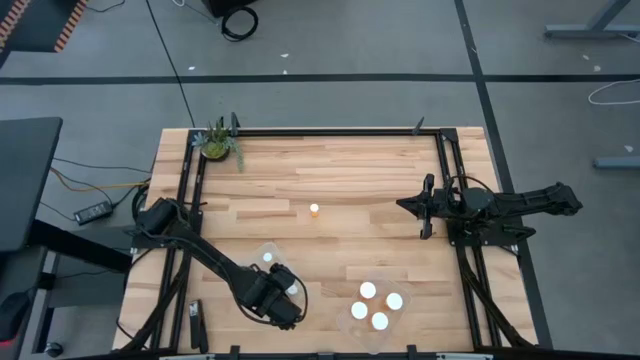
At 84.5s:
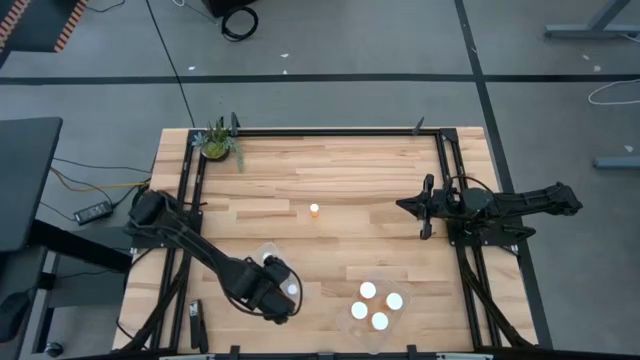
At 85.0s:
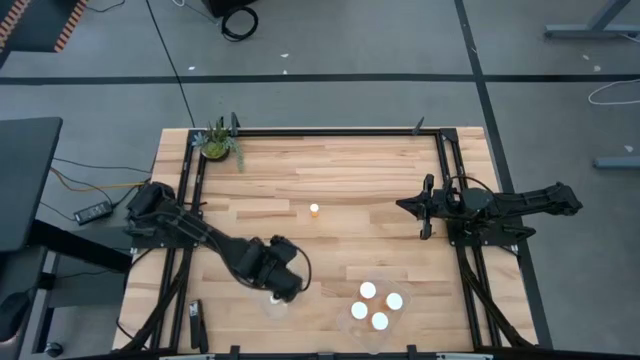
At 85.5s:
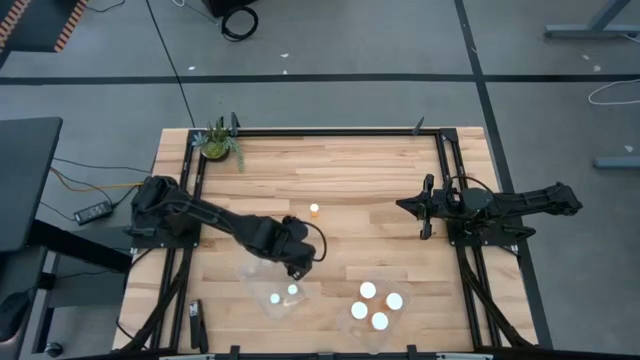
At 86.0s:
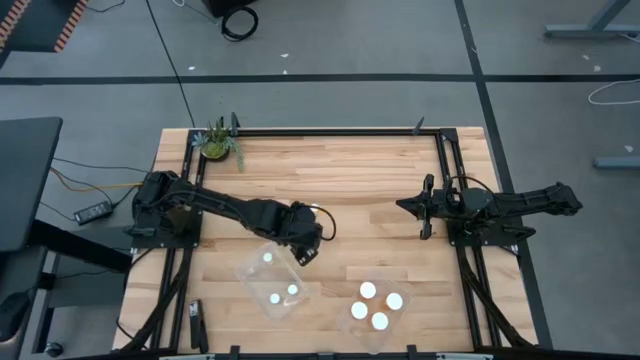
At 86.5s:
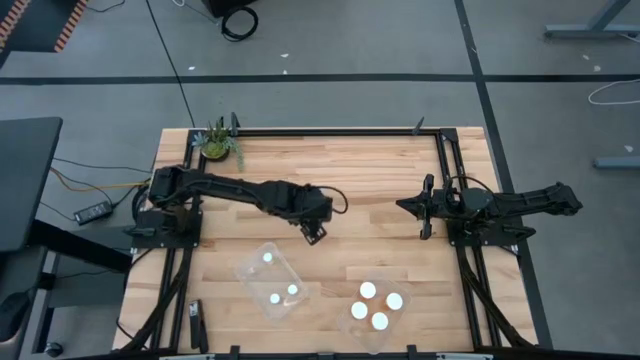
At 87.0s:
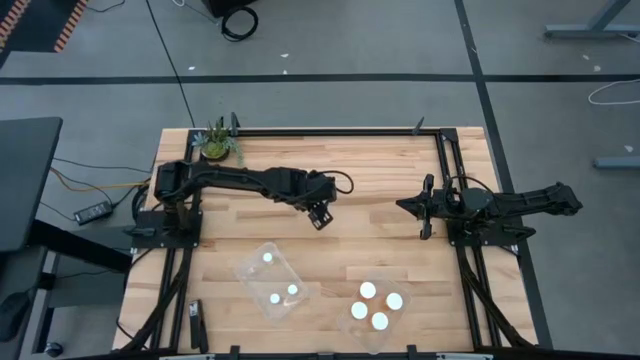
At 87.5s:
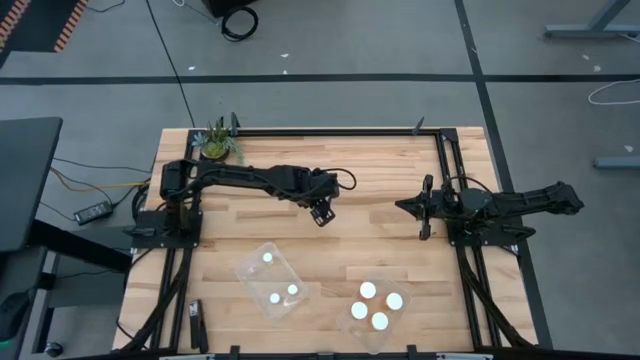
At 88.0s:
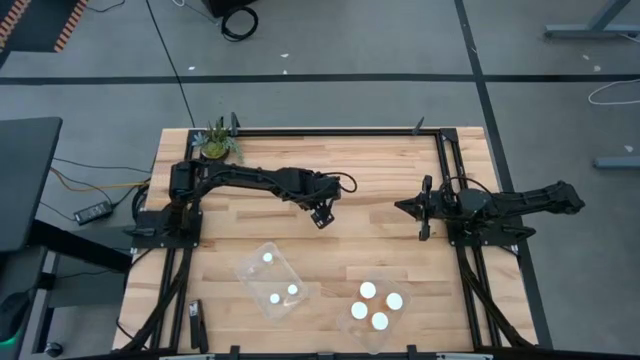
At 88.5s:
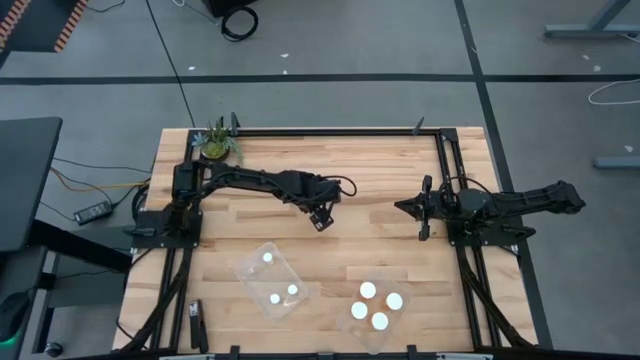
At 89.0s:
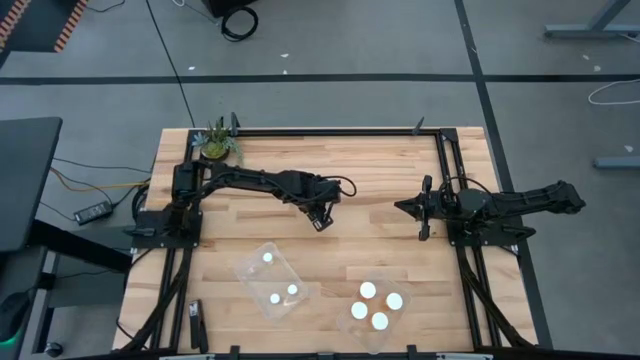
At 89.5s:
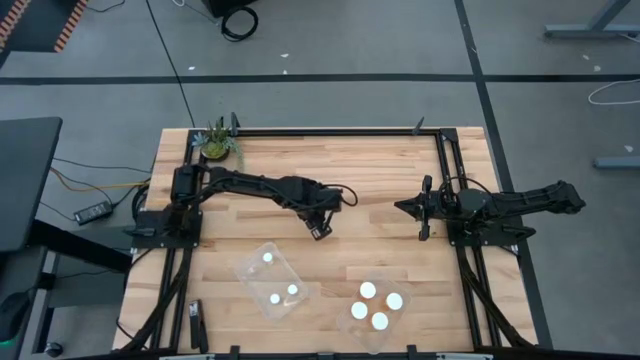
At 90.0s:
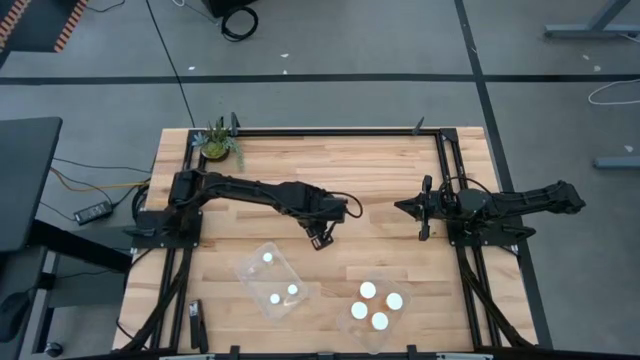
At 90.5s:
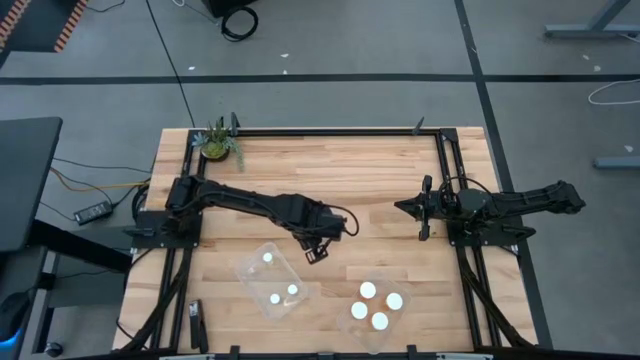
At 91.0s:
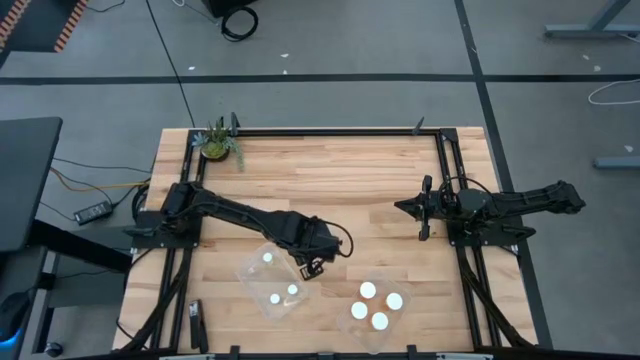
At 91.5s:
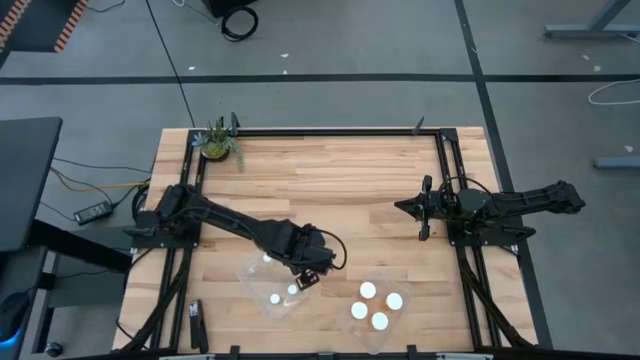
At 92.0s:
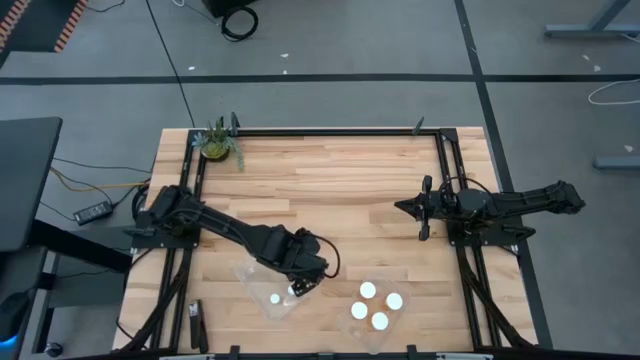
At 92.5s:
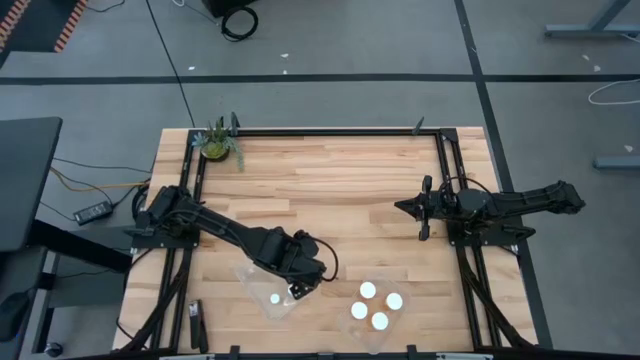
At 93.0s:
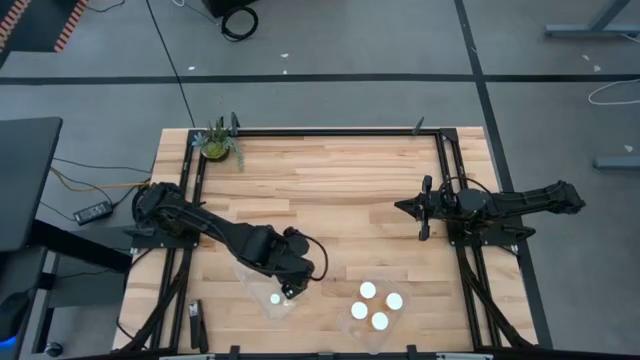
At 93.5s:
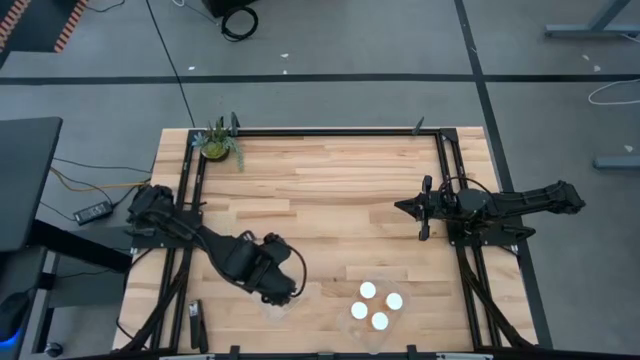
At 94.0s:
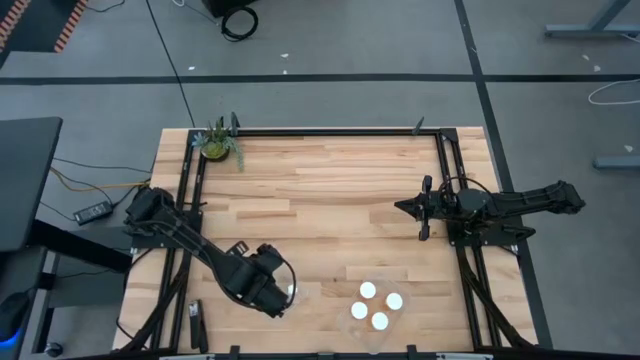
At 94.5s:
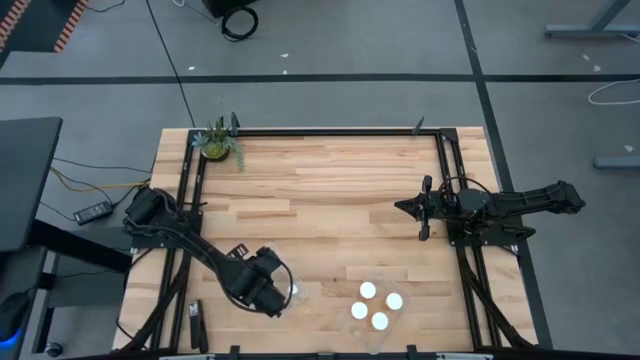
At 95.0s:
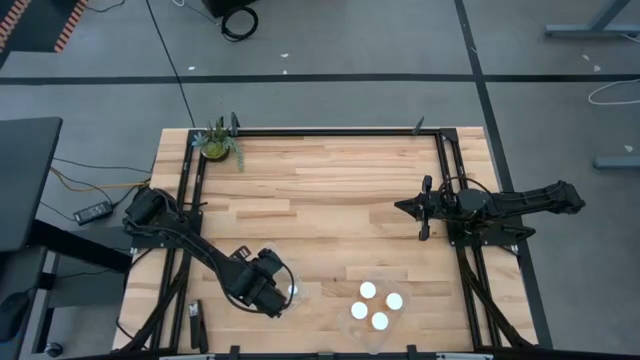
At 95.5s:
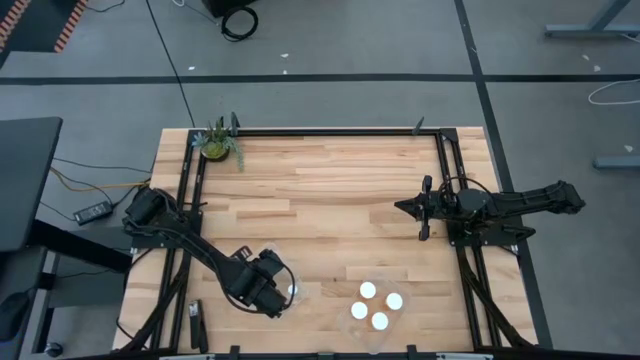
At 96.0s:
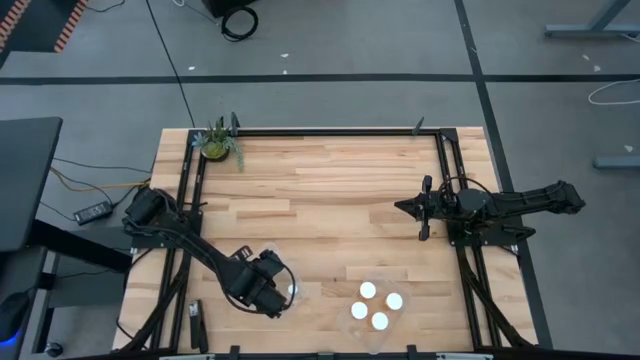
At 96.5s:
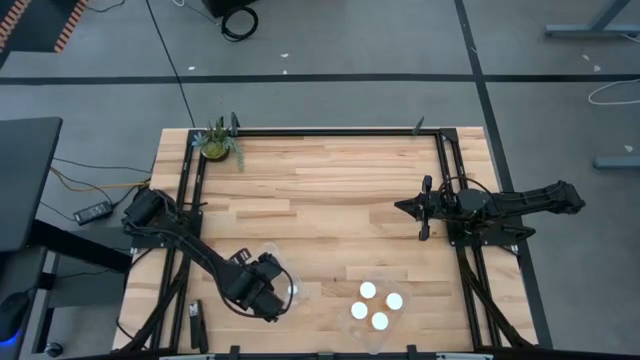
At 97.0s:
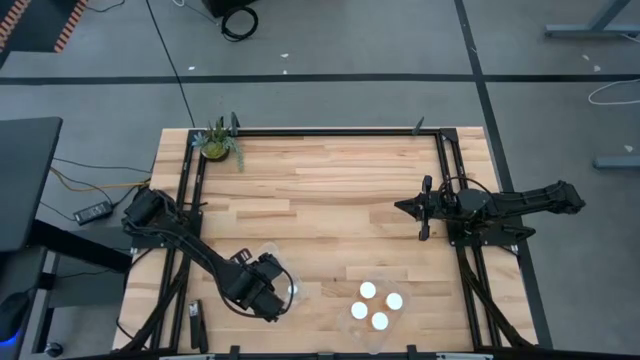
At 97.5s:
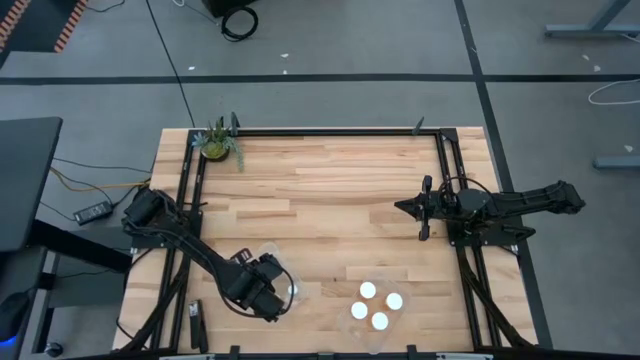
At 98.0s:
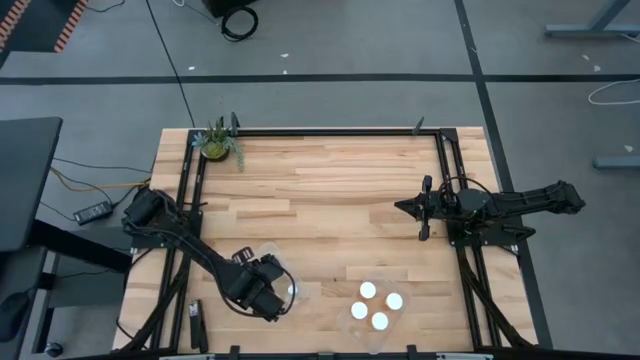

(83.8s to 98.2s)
Task: Pick and place medicine bottles into bin by pill shape (circle, oval)
Put the small orange pill bottle into the left transparent bin

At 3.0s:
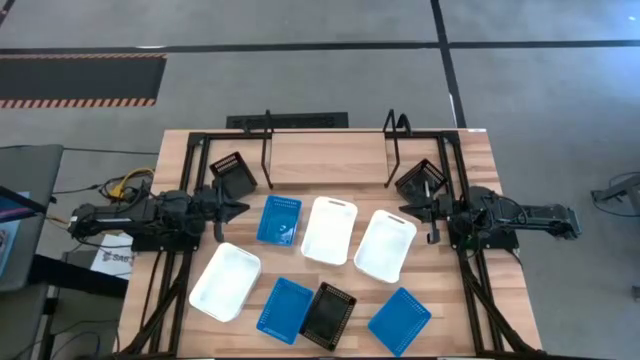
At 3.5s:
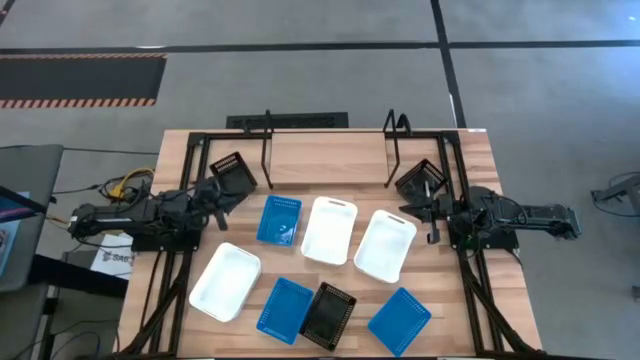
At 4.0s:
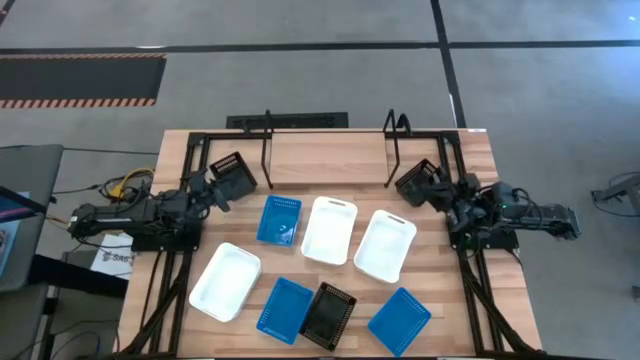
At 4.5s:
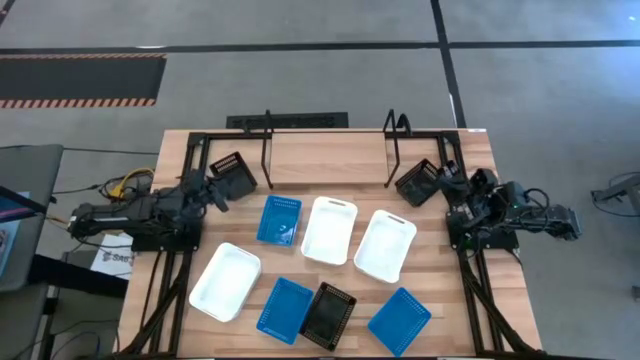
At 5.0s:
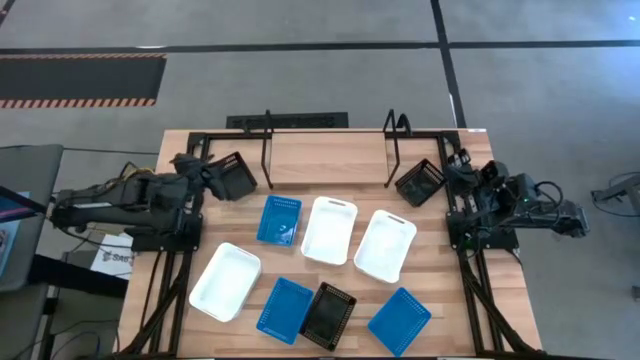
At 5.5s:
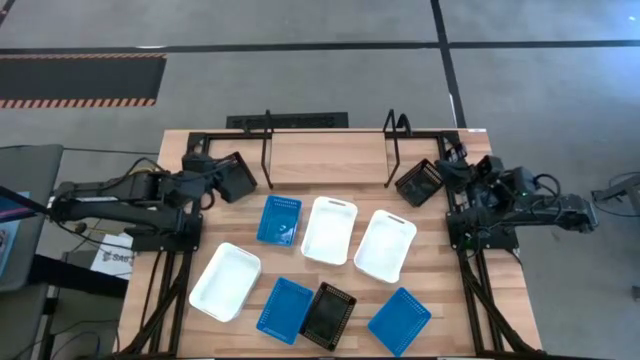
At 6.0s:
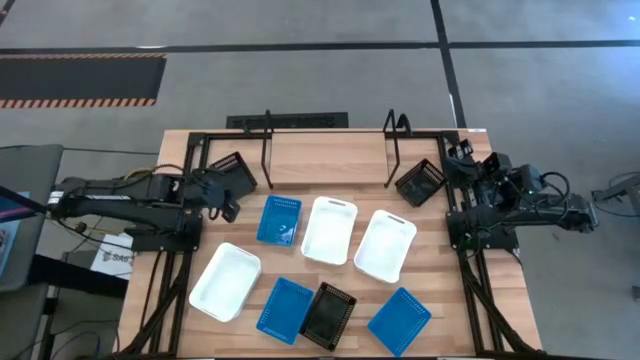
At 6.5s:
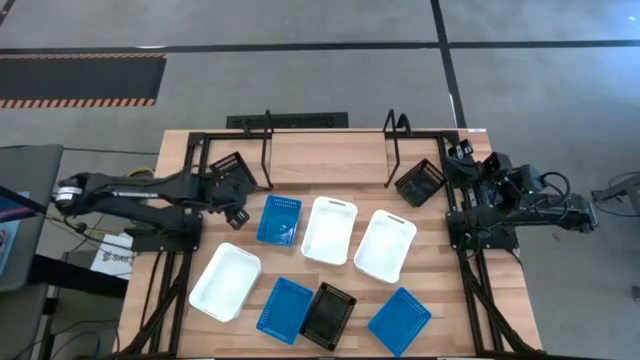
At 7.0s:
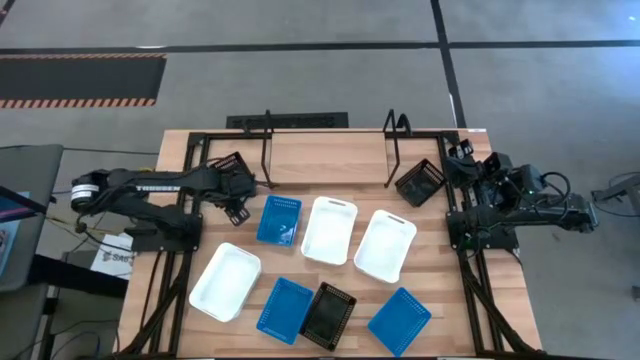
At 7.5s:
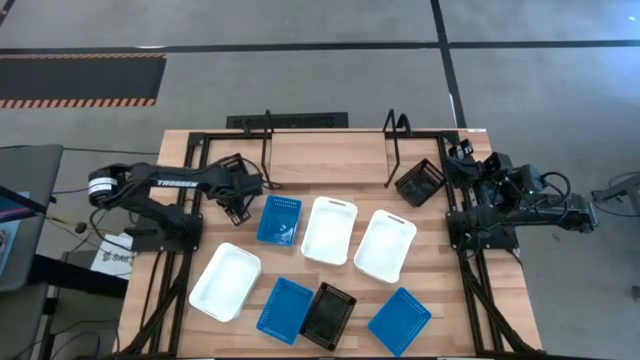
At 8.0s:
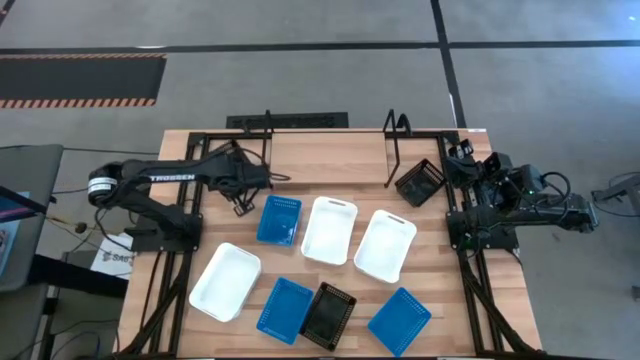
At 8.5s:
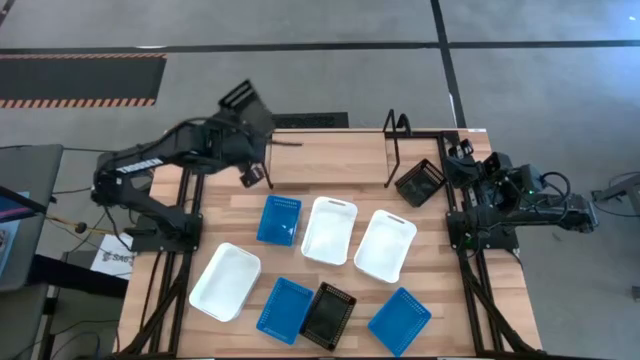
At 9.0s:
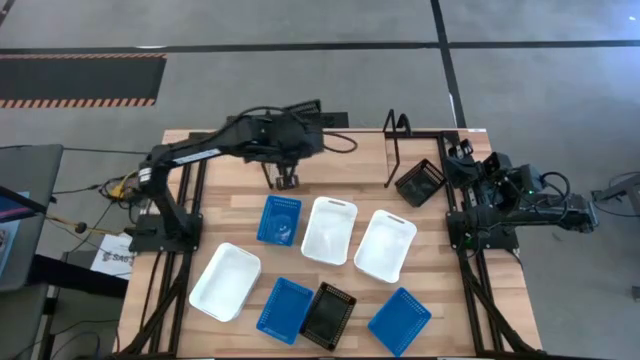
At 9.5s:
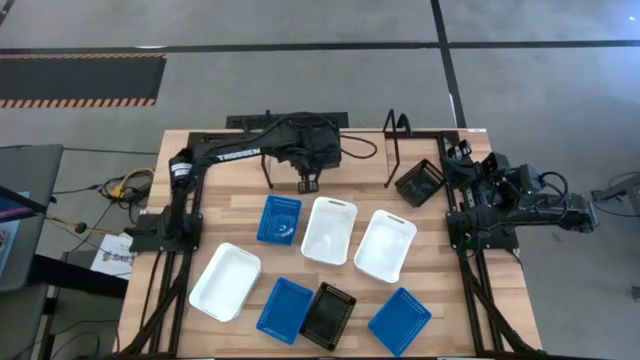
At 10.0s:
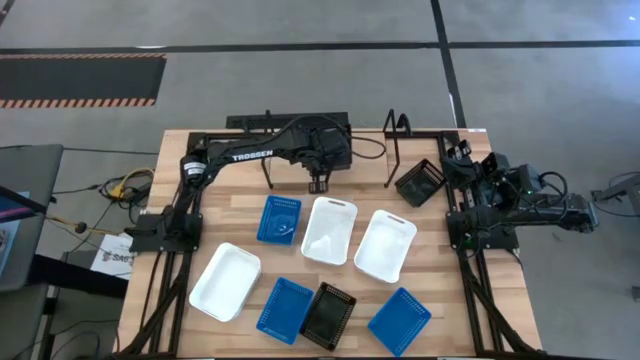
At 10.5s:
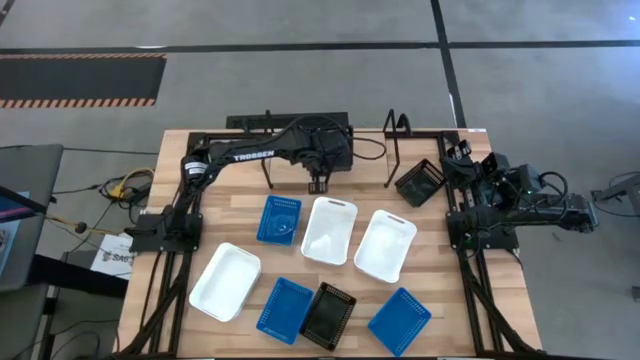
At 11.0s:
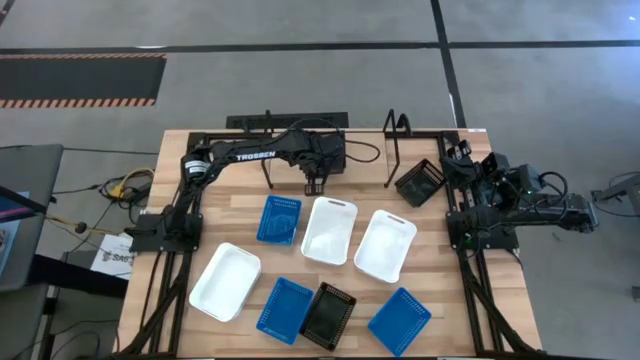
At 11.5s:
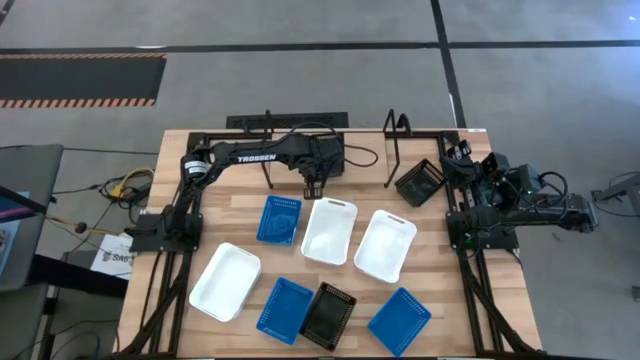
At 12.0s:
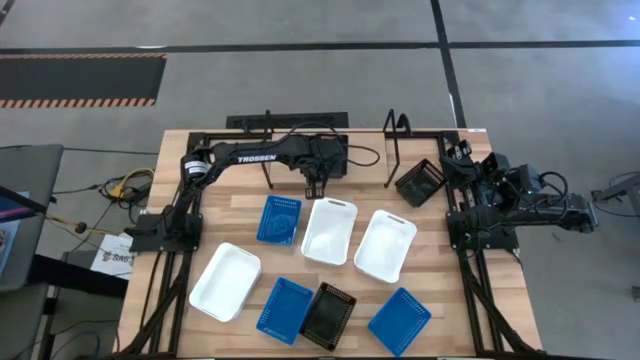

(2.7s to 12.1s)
Task: Stack baskets on shelf by color
Put the top left black bin on the shelf
